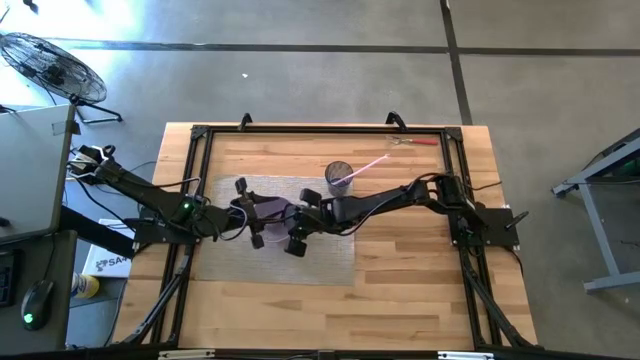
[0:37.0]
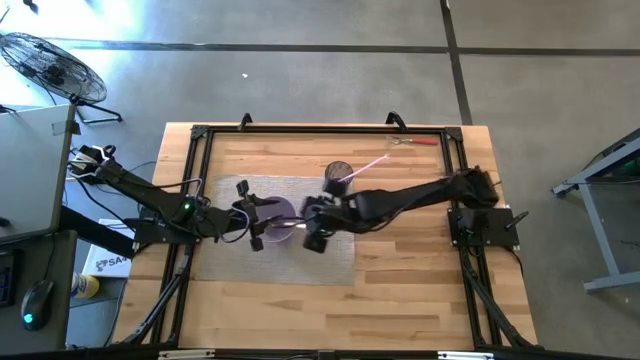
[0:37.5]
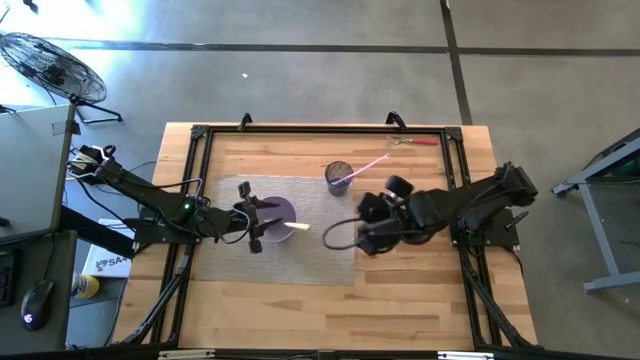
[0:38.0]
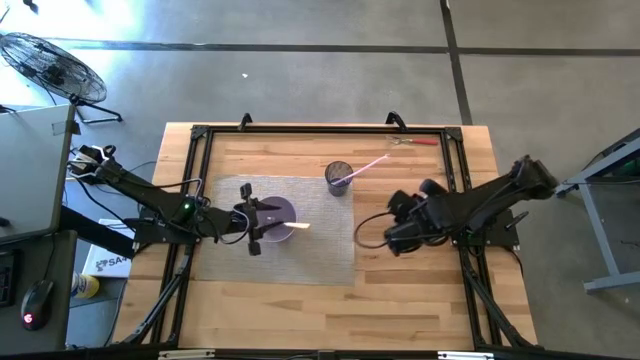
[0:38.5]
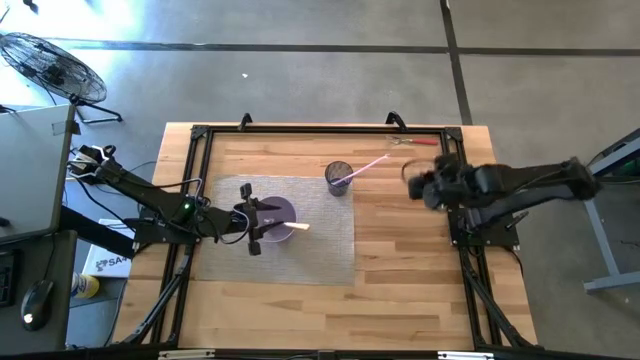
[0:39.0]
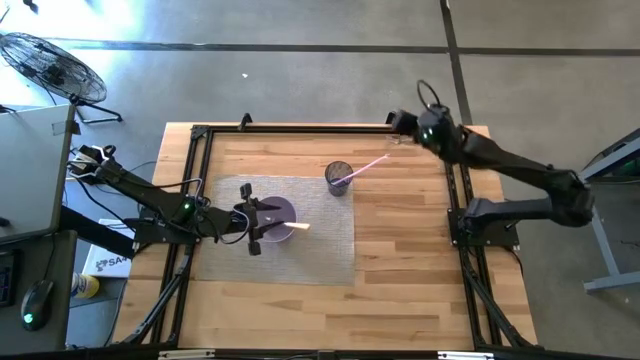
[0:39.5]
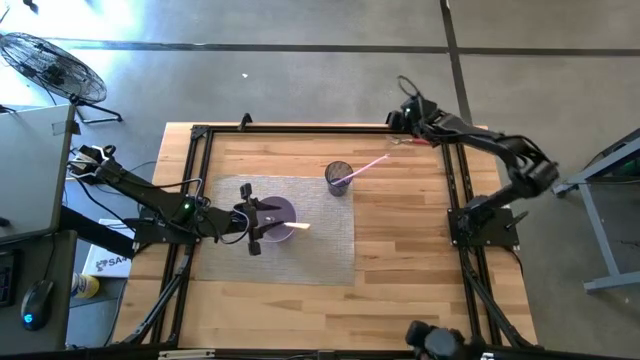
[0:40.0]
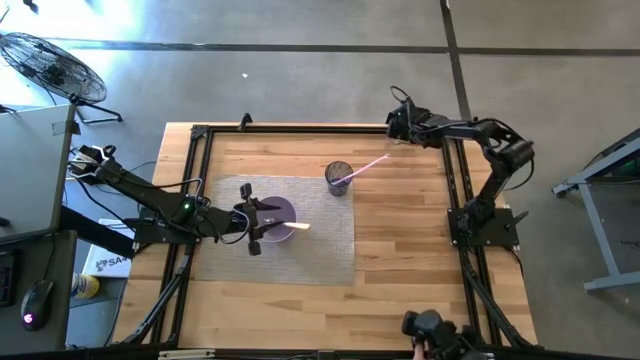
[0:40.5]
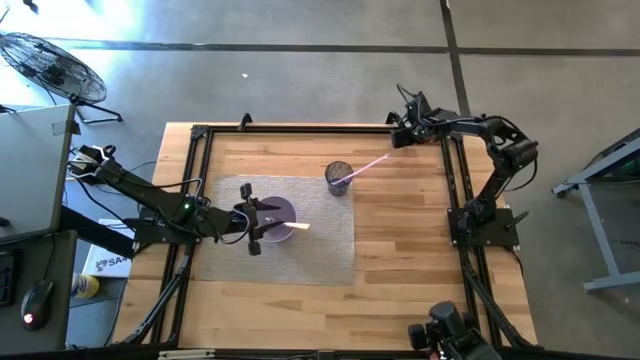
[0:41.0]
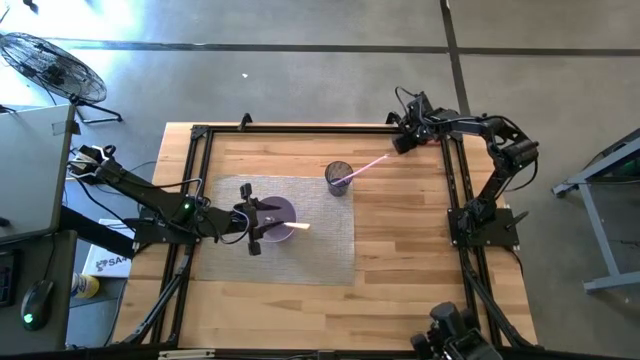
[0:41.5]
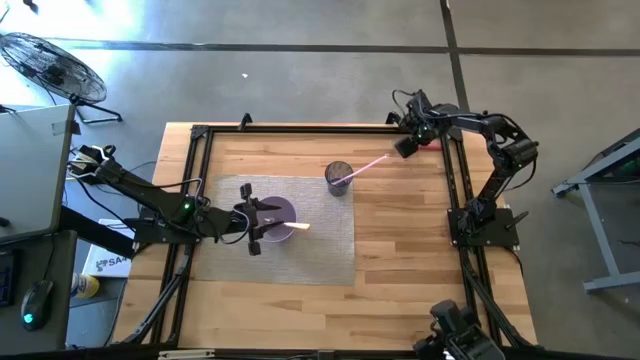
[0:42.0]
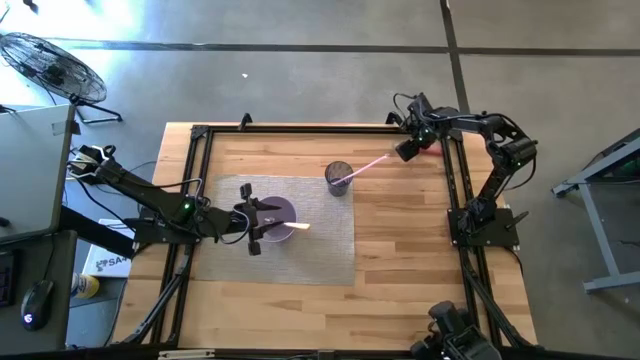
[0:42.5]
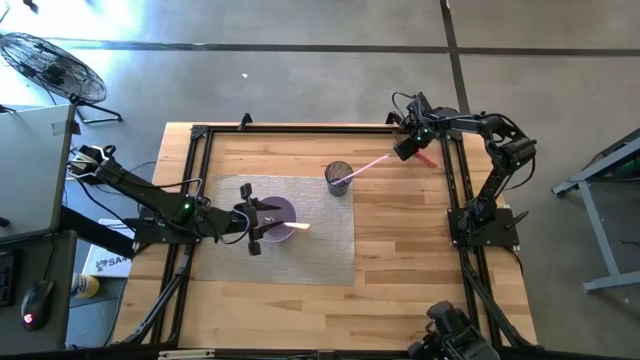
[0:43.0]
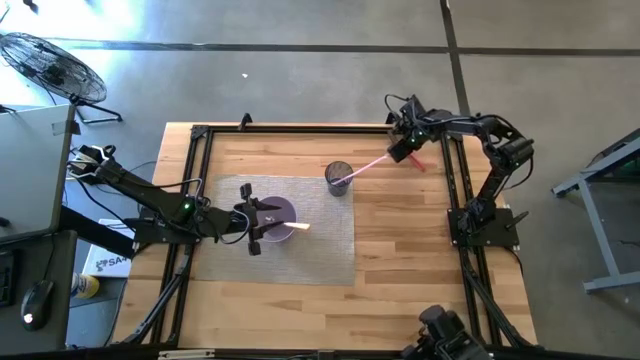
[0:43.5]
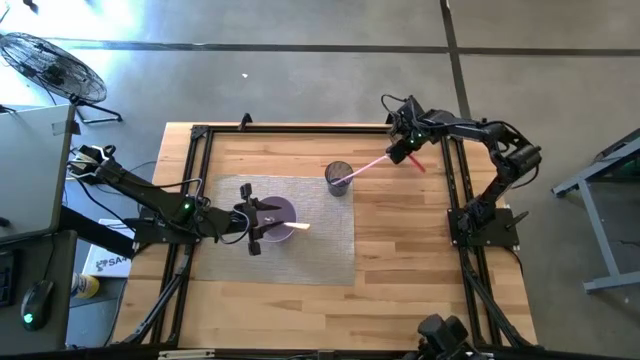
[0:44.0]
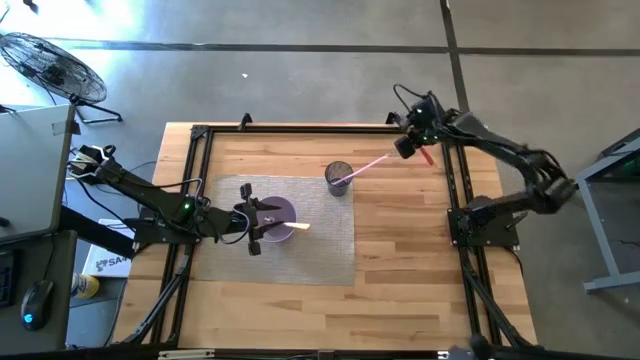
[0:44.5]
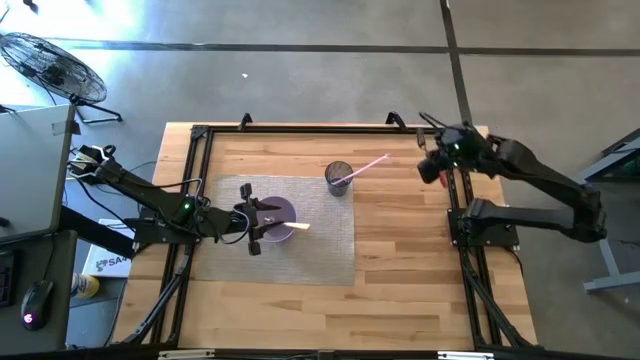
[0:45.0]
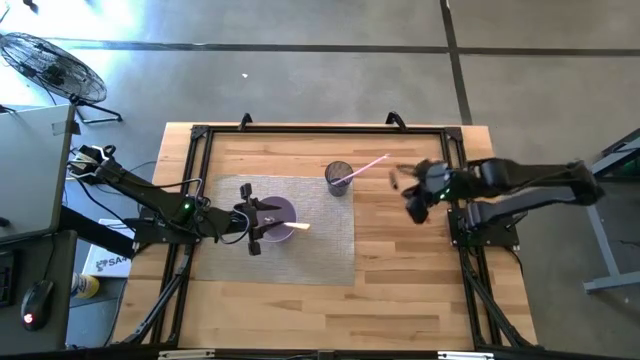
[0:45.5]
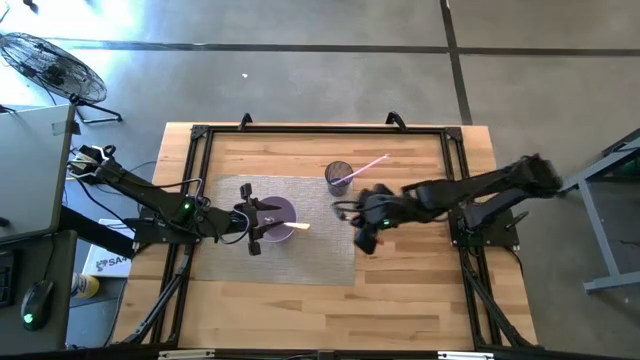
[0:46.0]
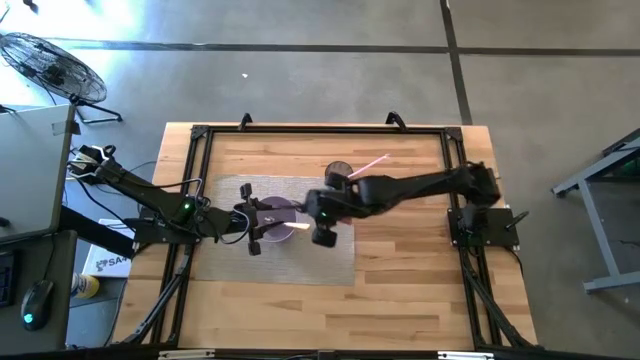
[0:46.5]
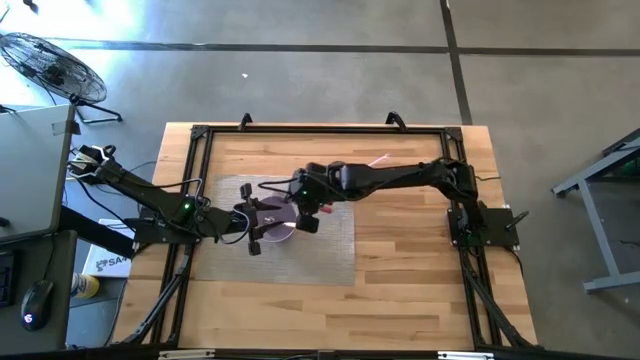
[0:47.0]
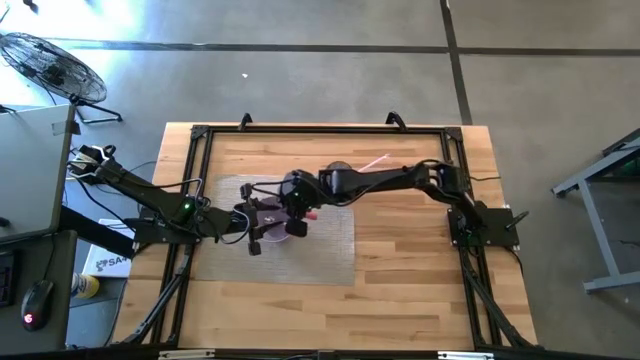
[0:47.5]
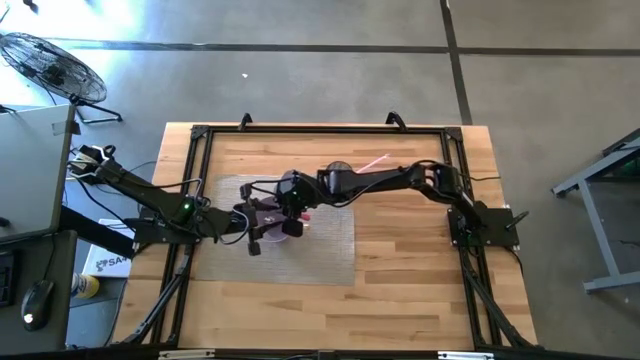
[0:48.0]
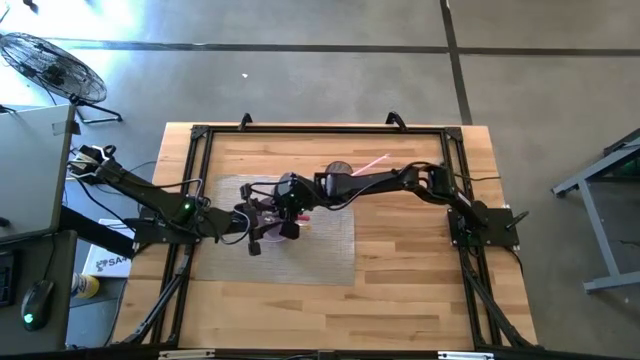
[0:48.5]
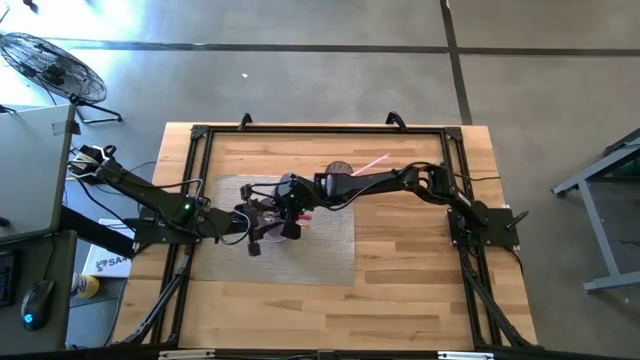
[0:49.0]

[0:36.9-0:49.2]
Task: Pick & Place Utensil
Put the red fork into the purple bowl on the gray mat

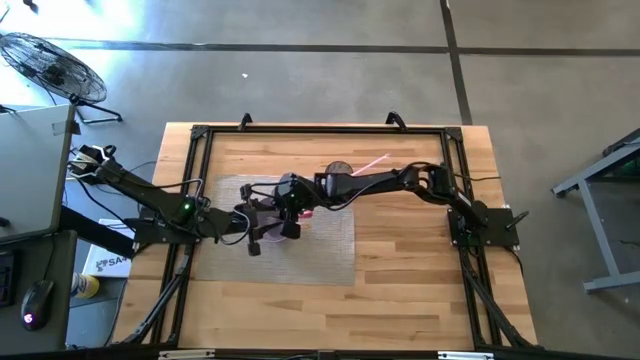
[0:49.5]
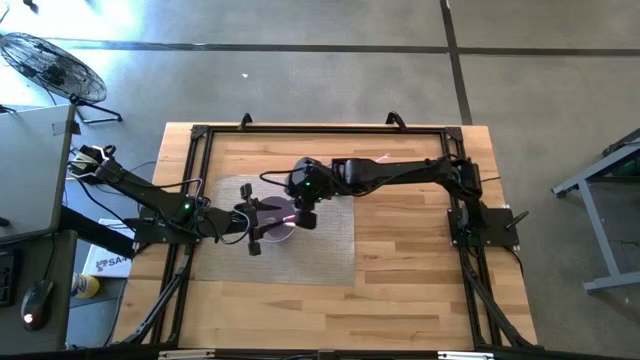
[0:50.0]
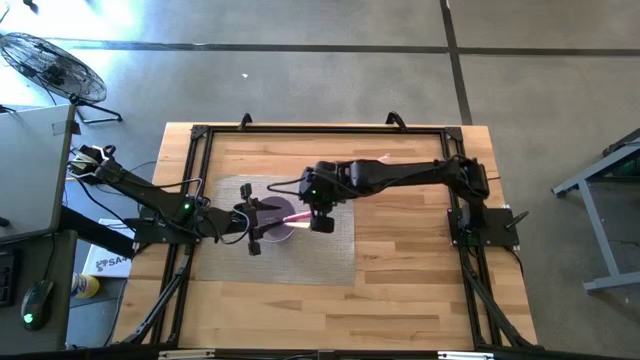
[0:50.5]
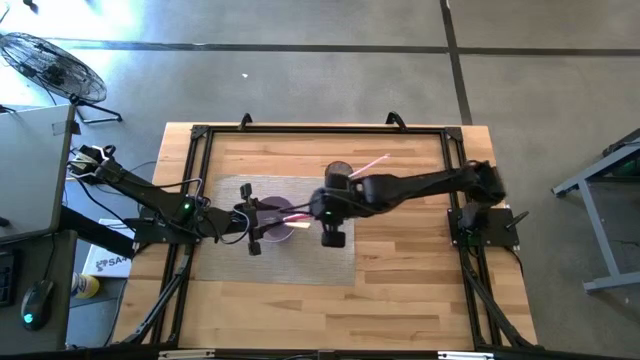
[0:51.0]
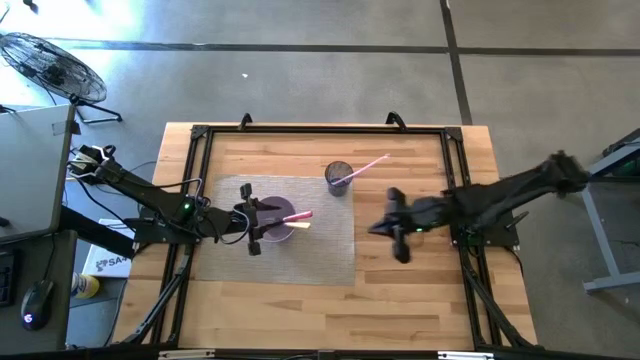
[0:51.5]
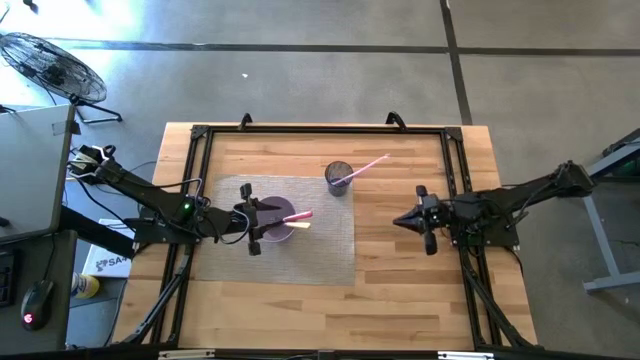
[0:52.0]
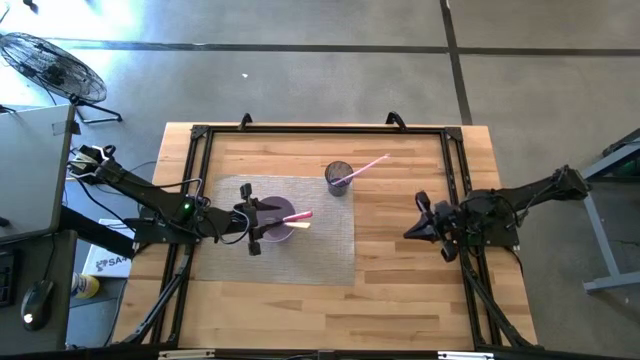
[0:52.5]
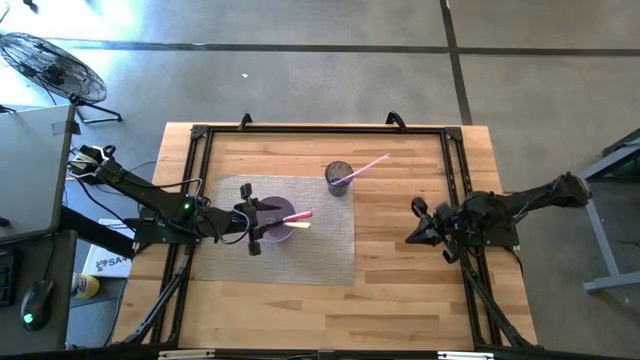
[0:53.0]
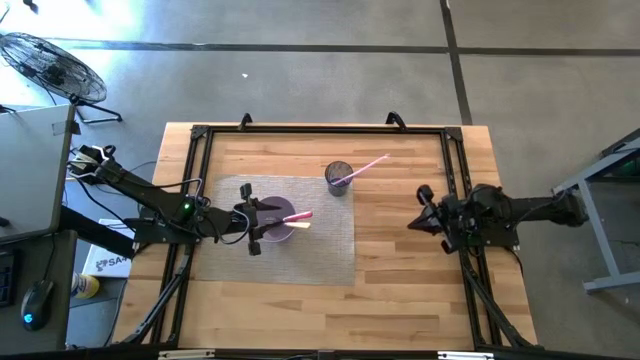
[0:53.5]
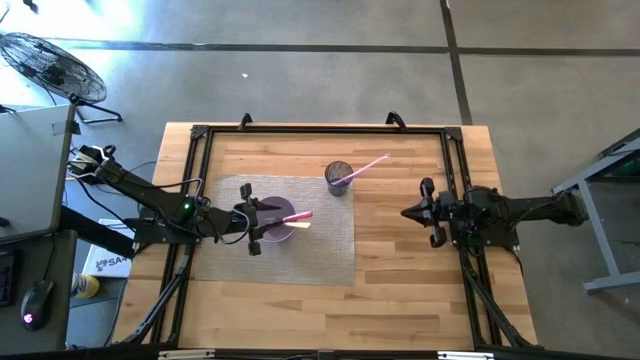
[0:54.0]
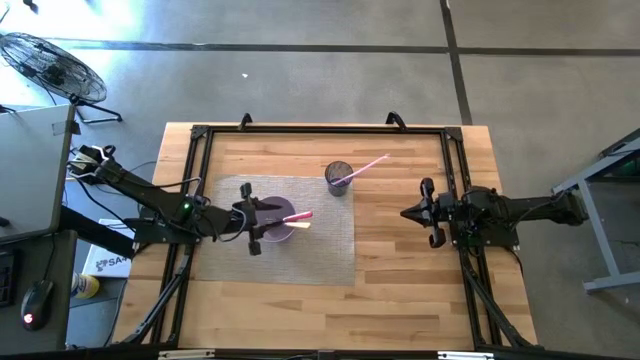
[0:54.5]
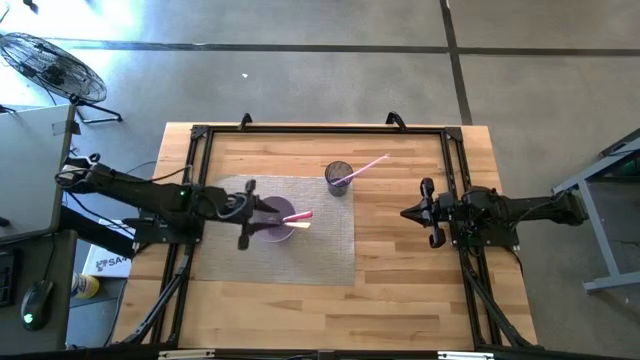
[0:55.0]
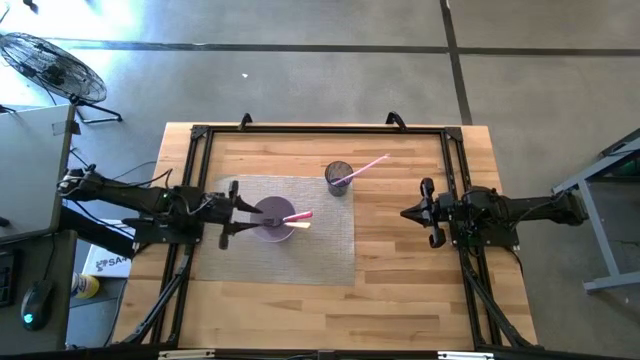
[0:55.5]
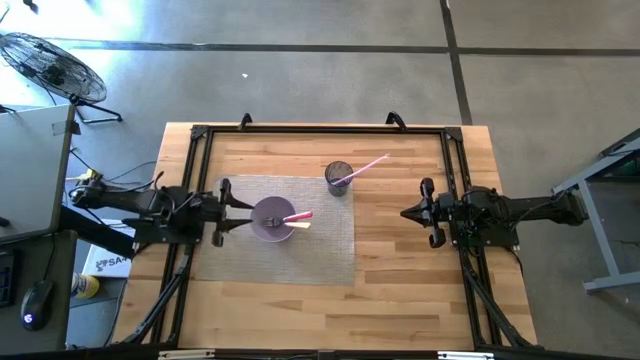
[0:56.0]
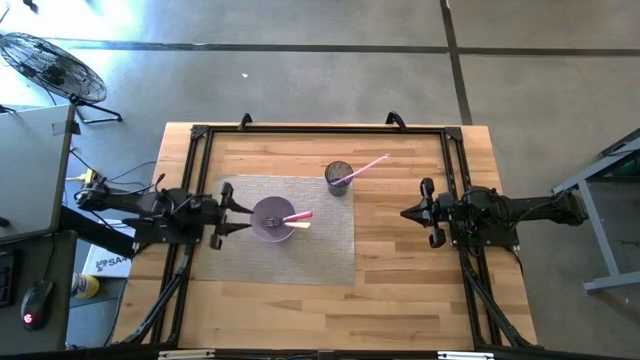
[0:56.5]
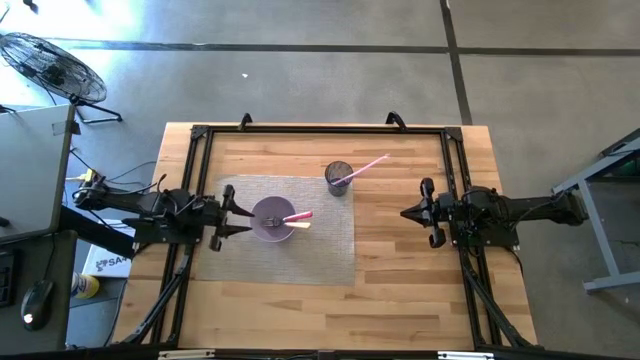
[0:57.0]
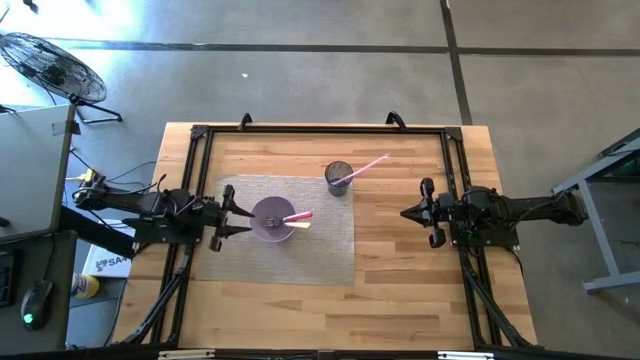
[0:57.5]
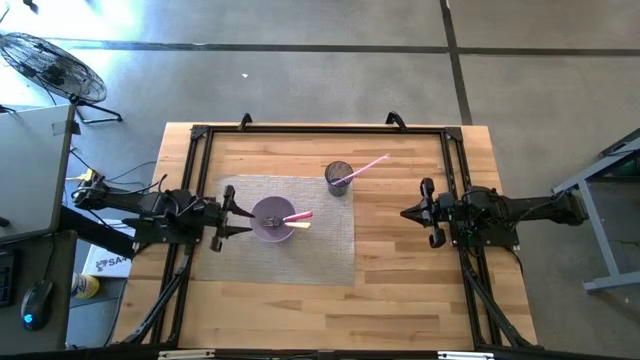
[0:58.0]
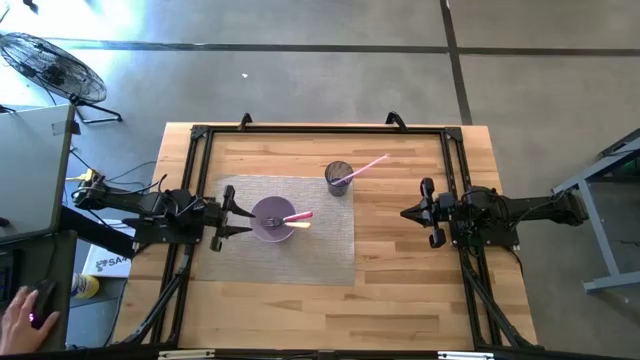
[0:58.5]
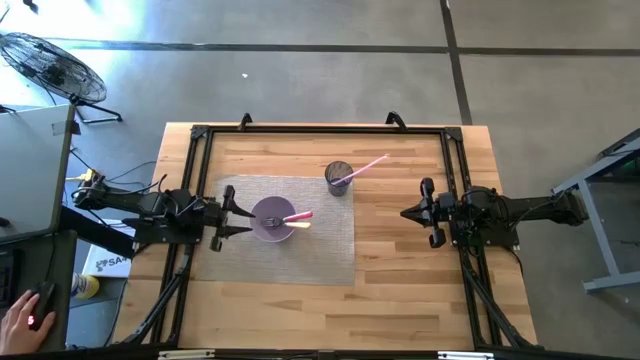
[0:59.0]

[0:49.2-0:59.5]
Return to Home Position
